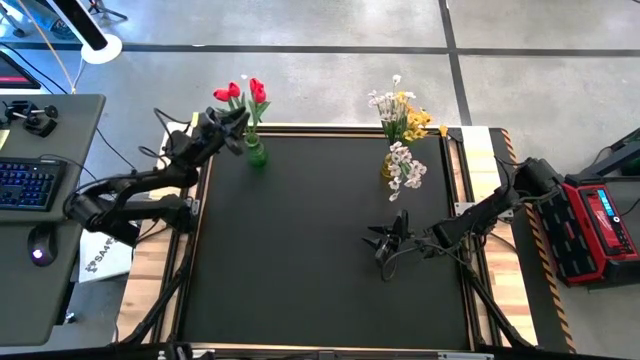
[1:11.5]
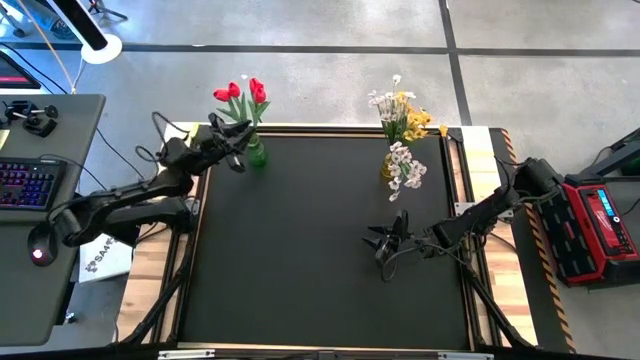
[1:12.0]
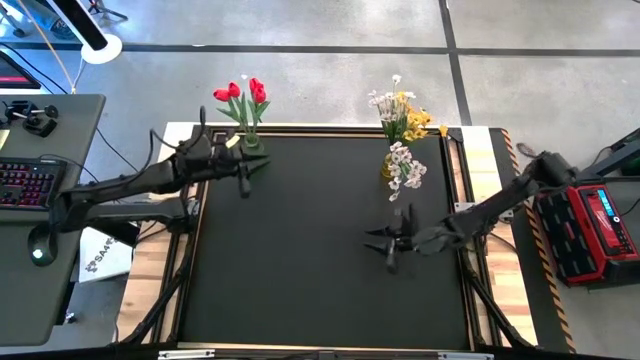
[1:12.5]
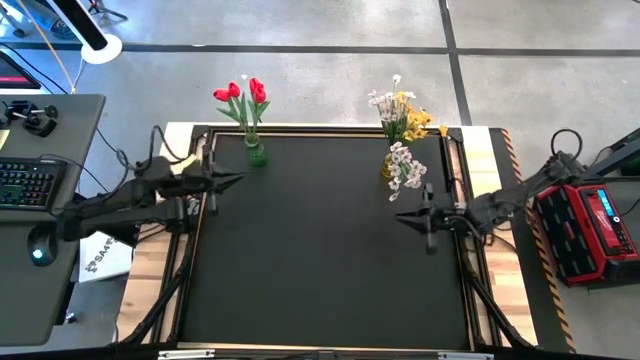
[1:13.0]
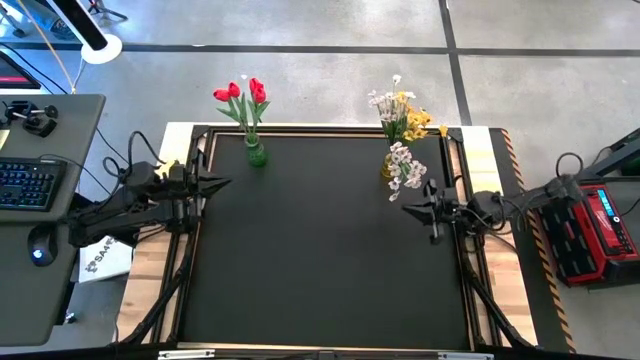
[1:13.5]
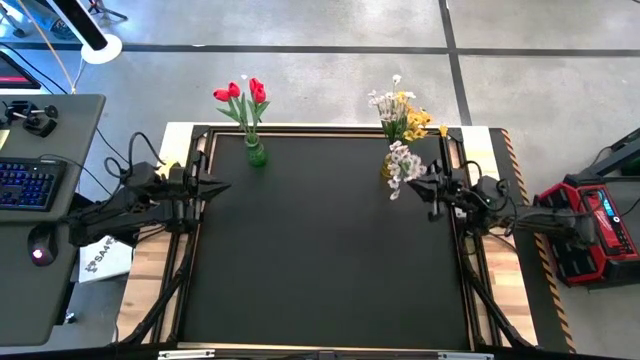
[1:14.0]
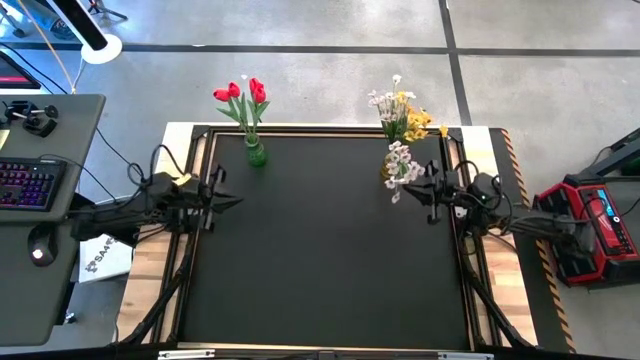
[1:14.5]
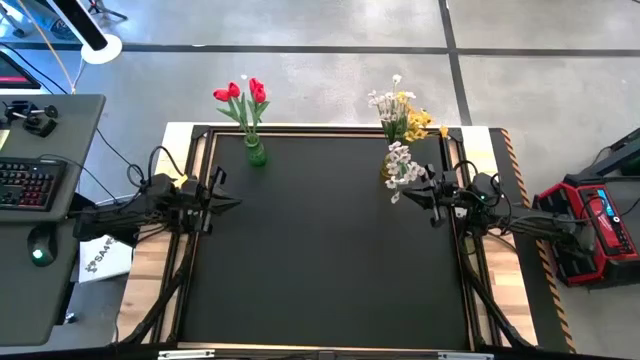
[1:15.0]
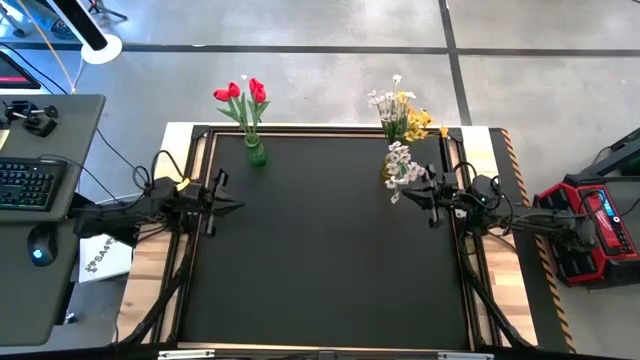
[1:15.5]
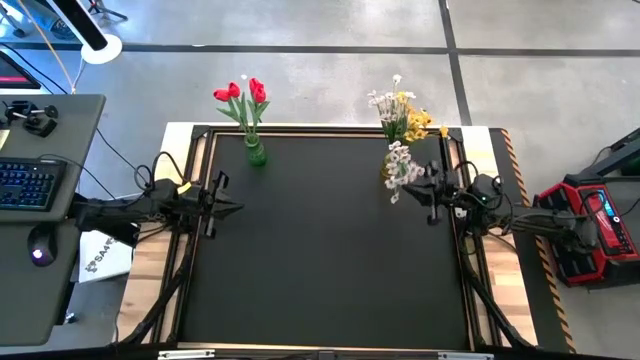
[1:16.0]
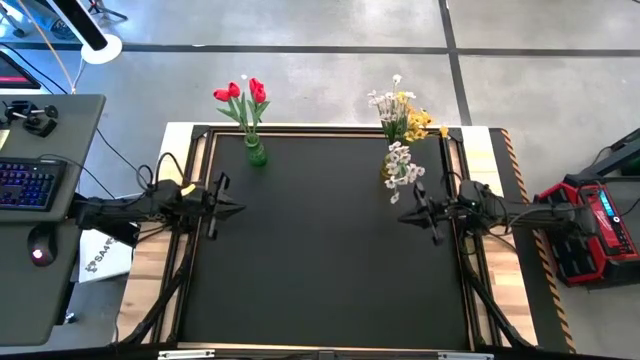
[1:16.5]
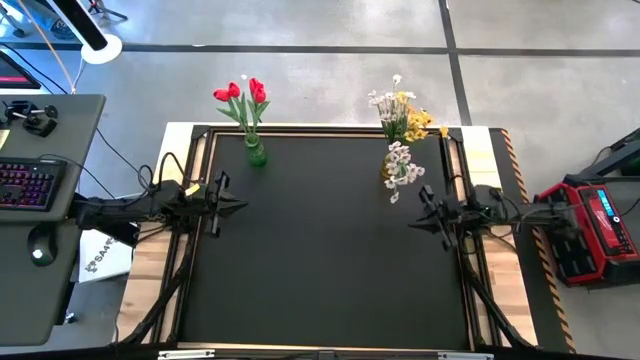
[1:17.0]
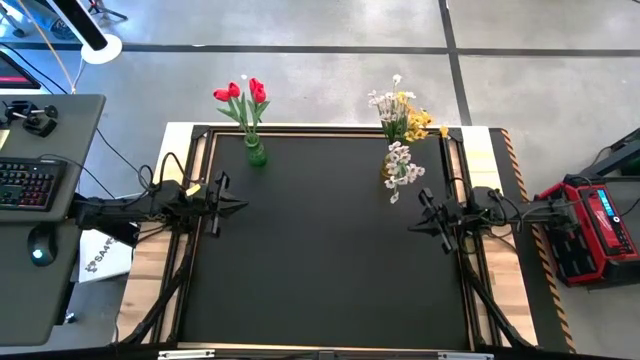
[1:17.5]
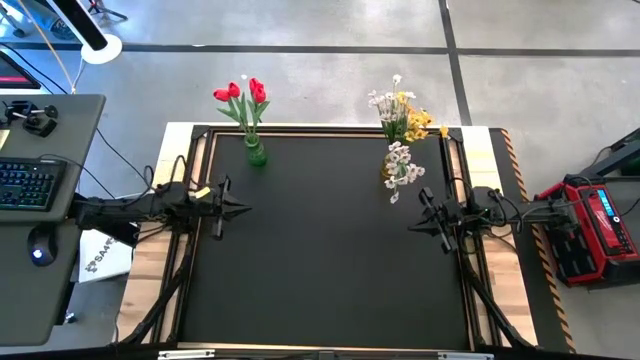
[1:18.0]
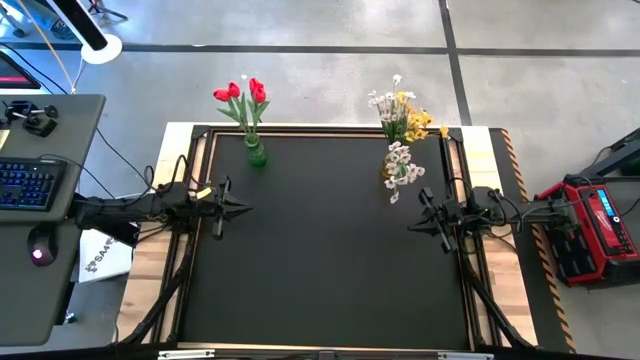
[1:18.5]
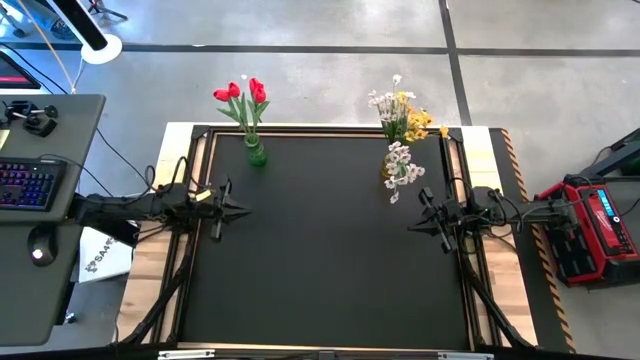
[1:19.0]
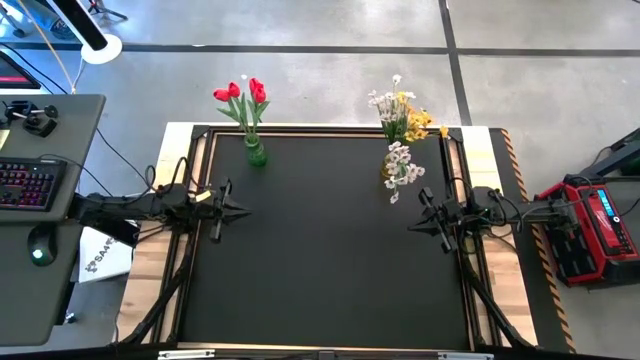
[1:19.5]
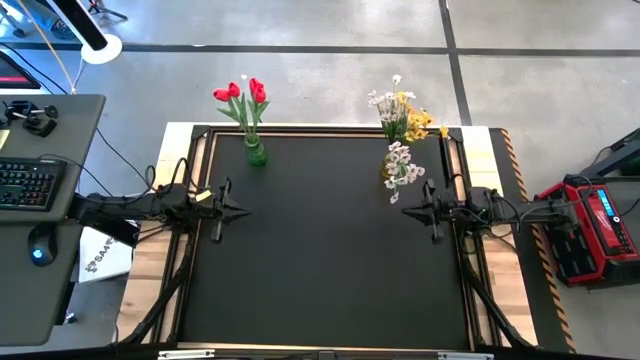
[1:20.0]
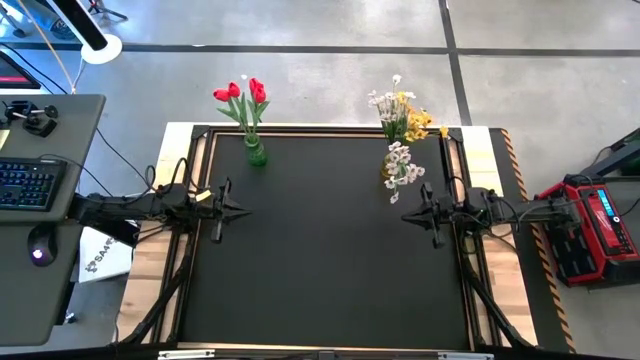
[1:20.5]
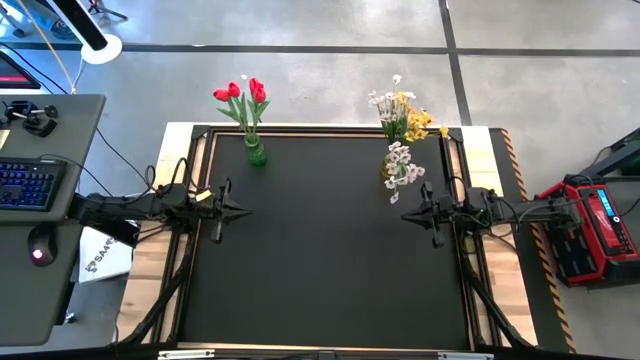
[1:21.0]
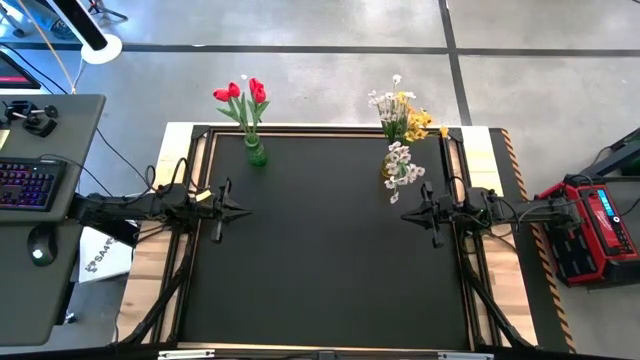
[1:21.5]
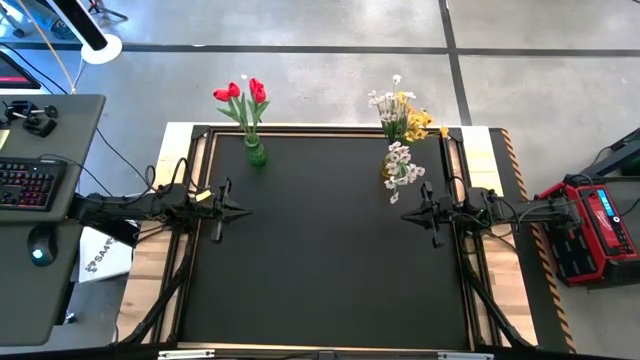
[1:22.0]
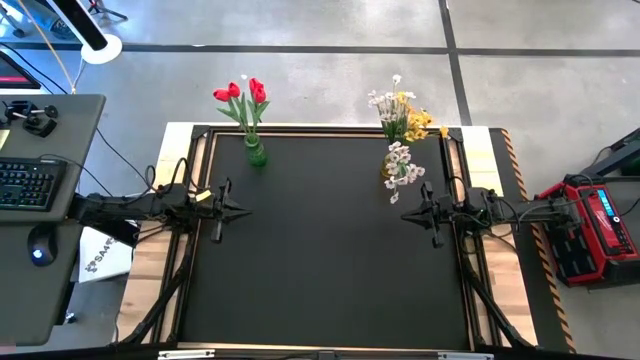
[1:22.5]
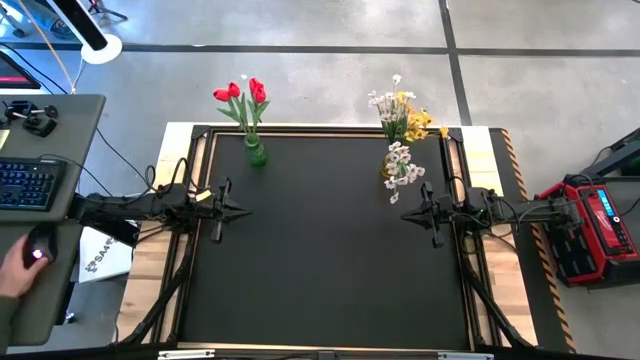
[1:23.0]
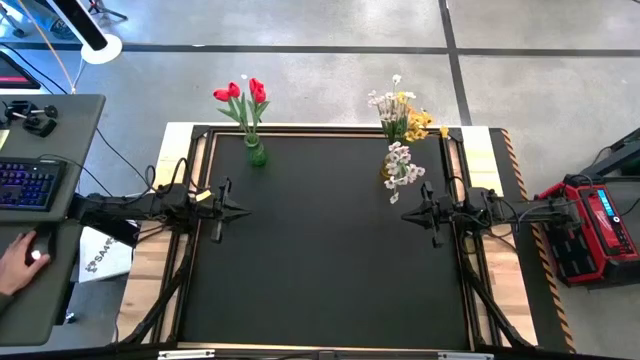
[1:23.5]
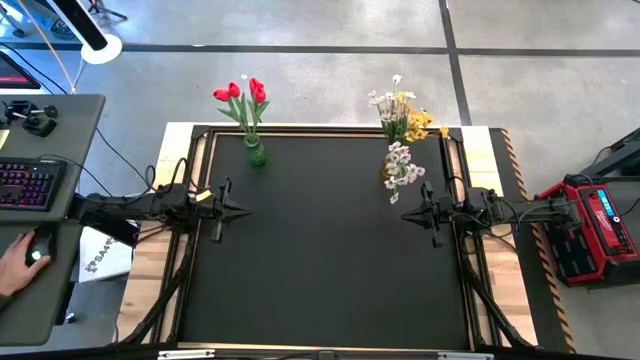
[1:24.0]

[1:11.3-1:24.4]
Task: Sort flowers into vase by color
Return to Home Position

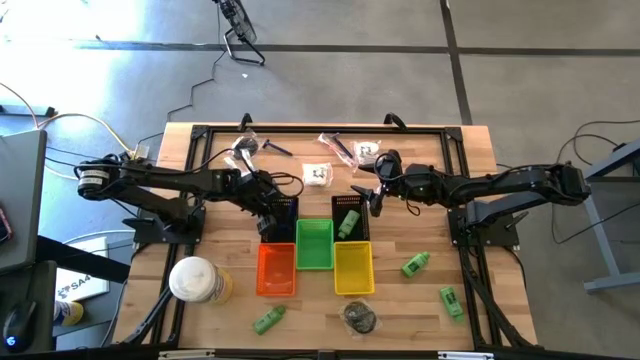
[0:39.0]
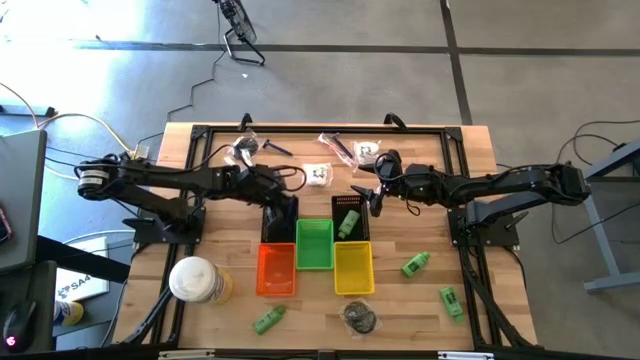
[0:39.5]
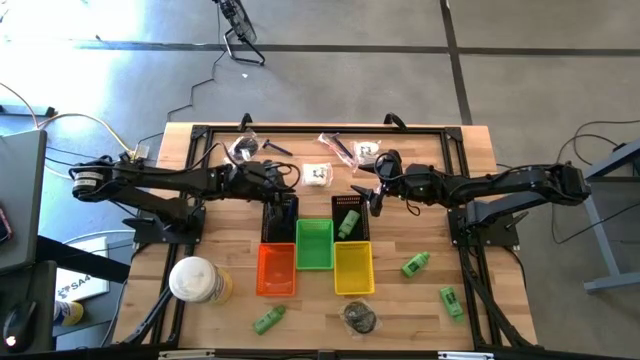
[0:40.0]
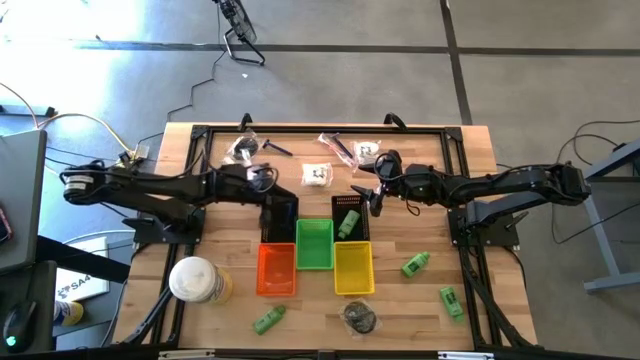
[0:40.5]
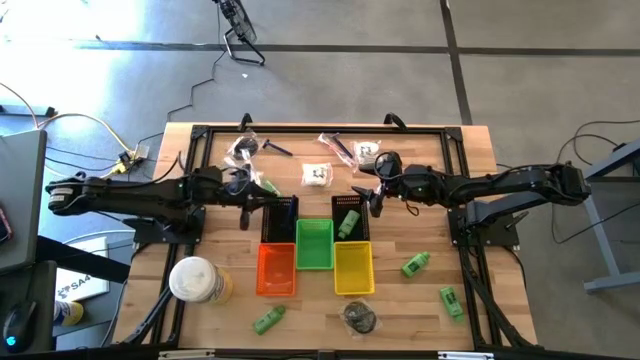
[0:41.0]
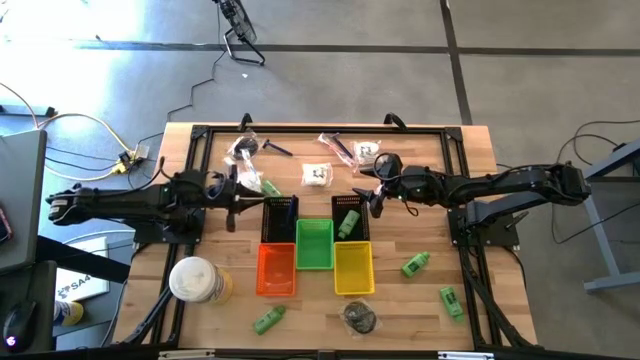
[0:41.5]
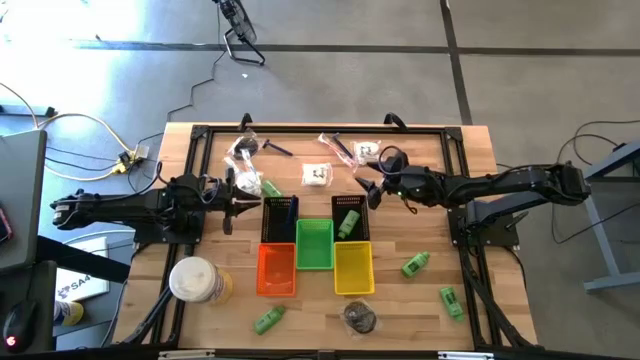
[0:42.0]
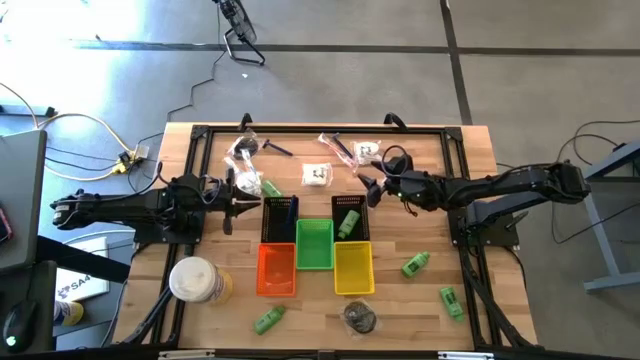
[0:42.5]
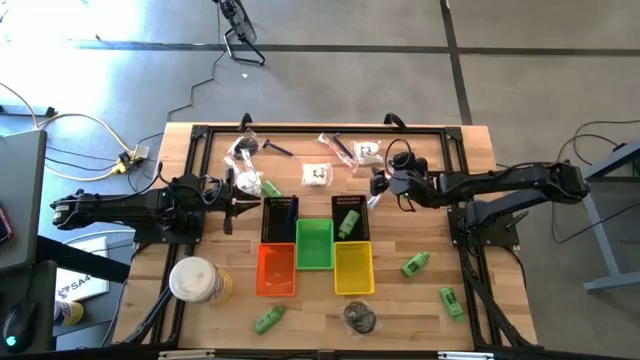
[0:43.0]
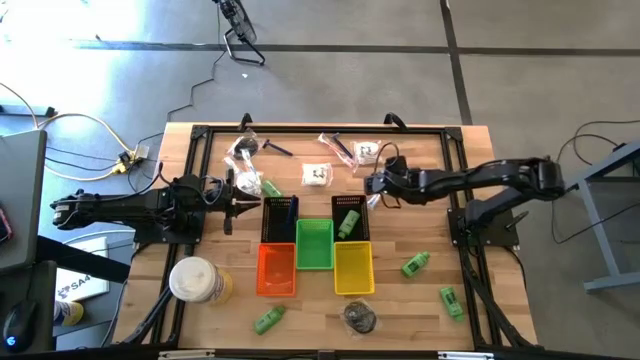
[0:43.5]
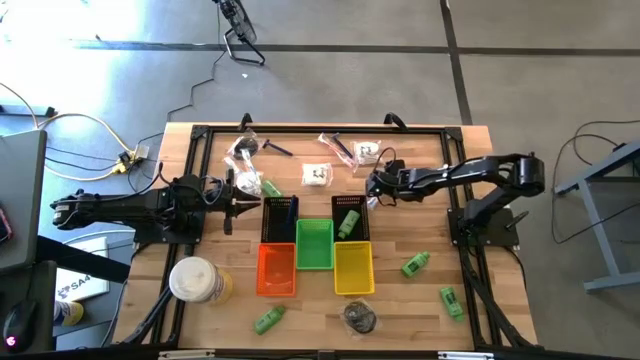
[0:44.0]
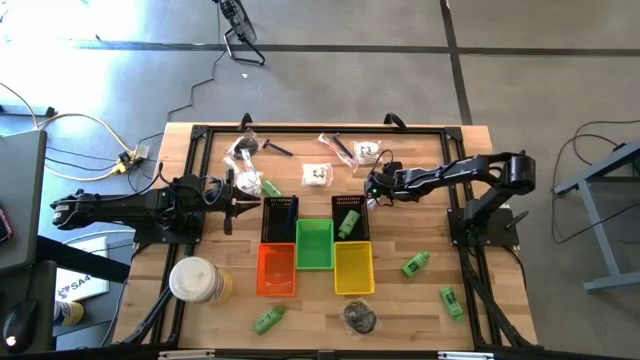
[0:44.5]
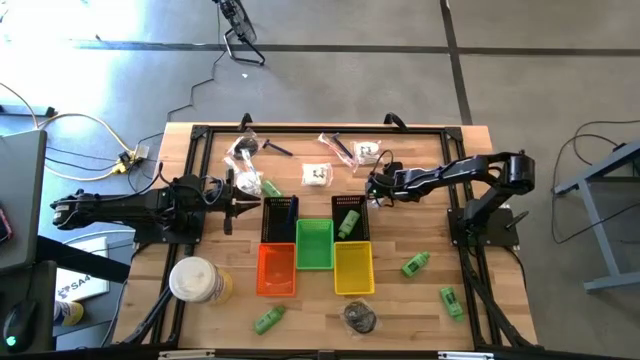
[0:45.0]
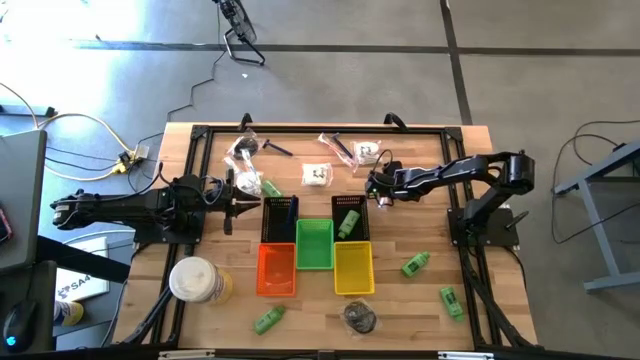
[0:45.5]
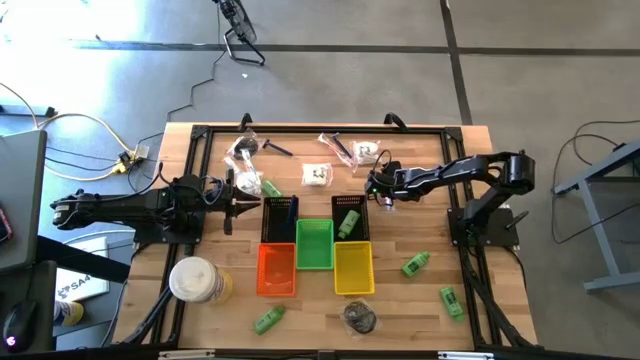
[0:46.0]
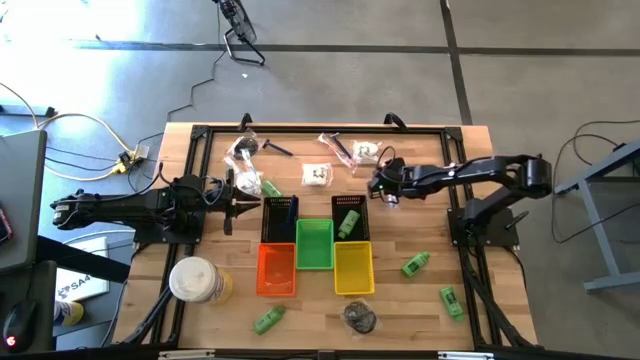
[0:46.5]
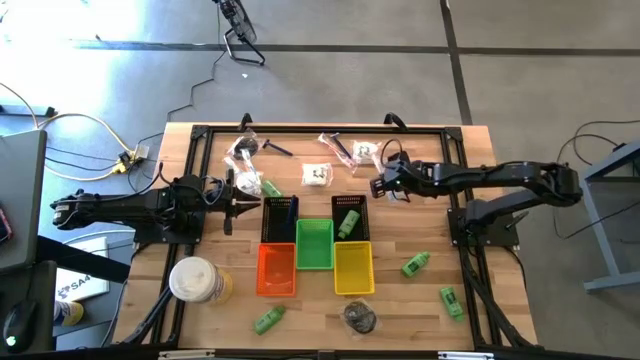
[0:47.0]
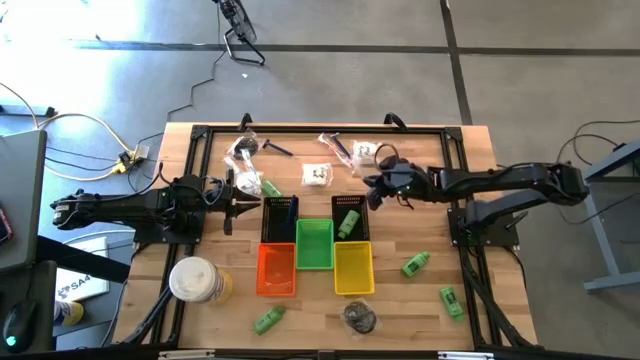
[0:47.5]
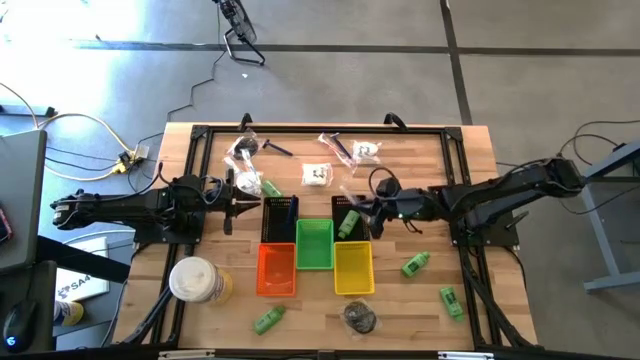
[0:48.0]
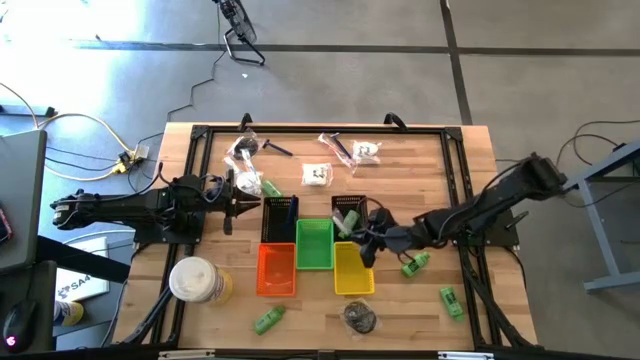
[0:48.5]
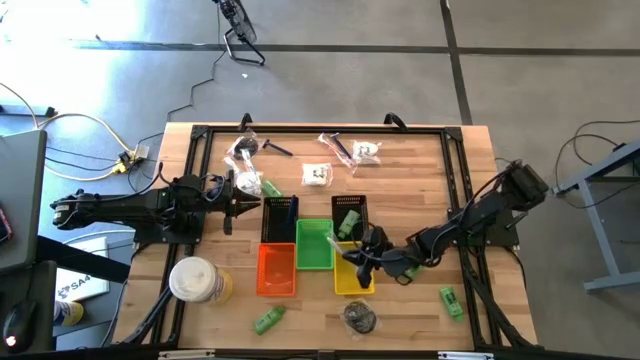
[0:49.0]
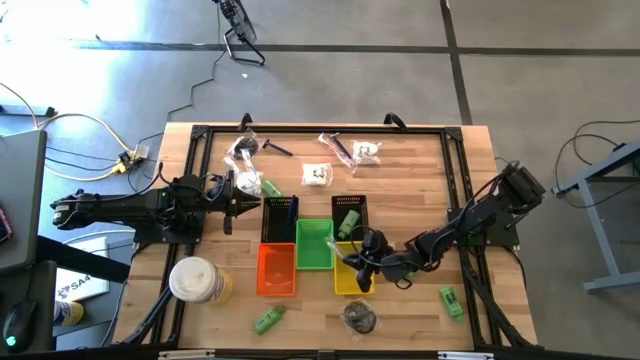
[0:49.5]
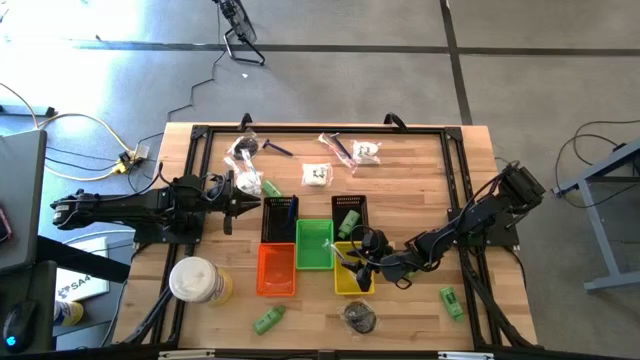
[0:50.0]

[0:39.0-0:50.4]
Task: Pick & Place Travel size toiletries
Put the right blue toothbrush into the yellow bin
